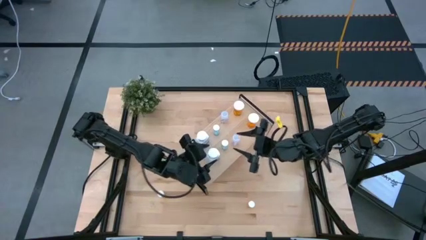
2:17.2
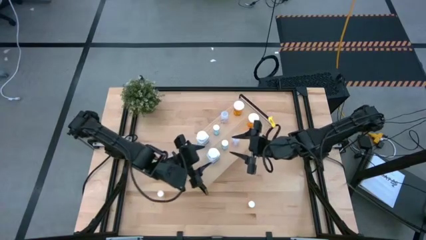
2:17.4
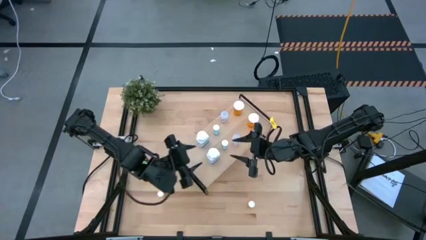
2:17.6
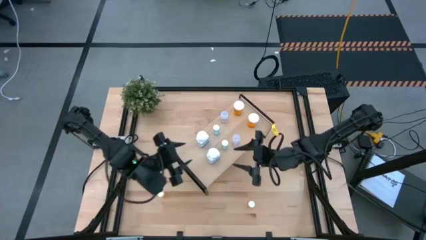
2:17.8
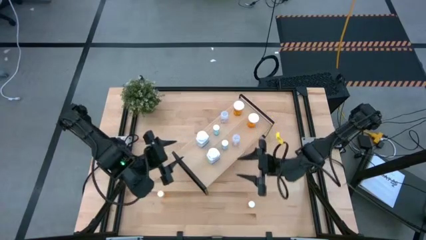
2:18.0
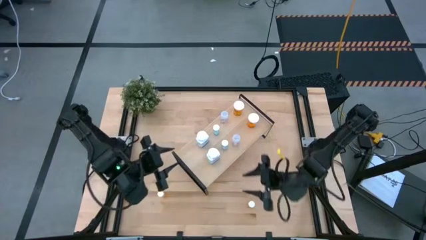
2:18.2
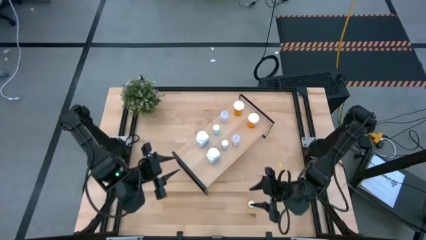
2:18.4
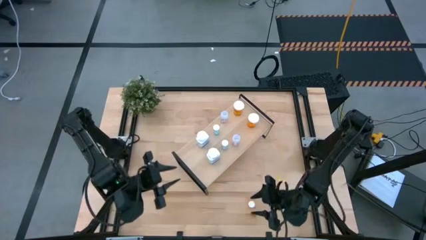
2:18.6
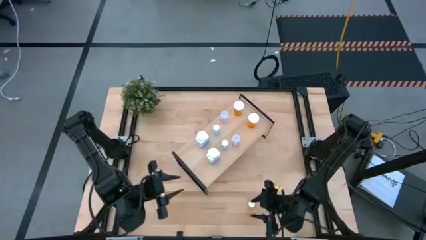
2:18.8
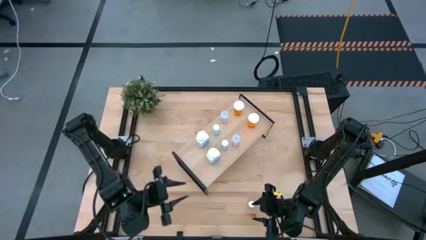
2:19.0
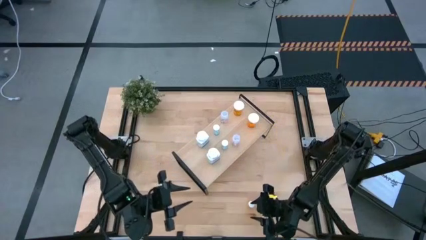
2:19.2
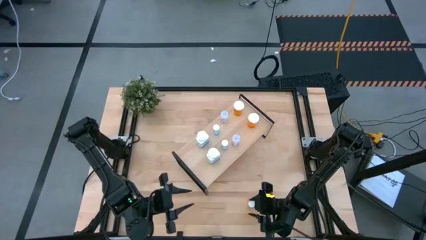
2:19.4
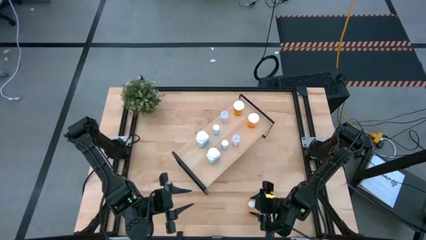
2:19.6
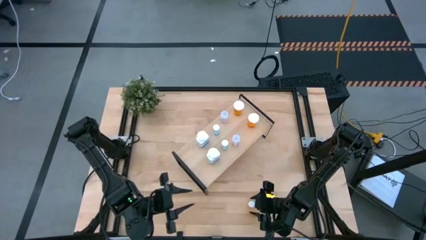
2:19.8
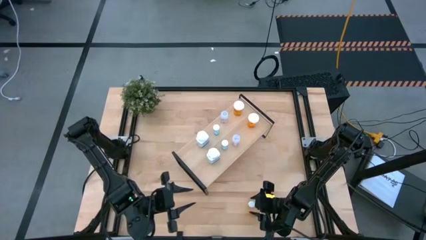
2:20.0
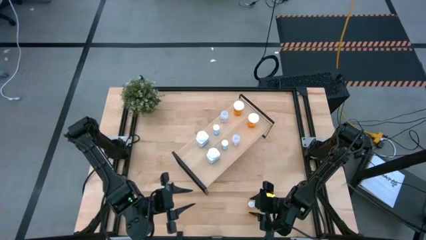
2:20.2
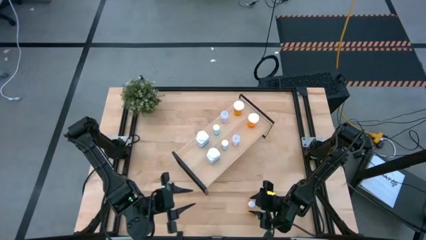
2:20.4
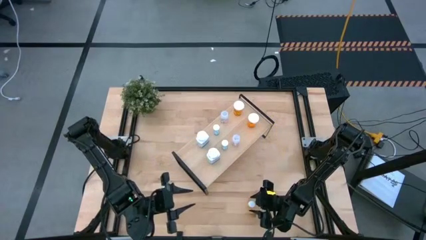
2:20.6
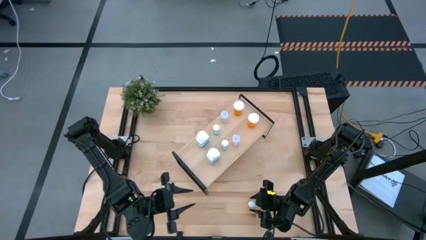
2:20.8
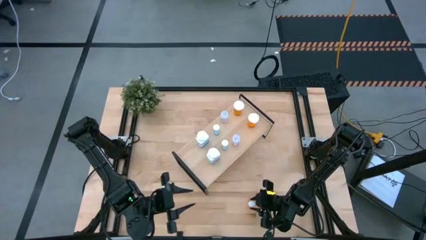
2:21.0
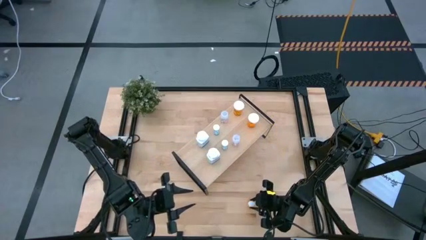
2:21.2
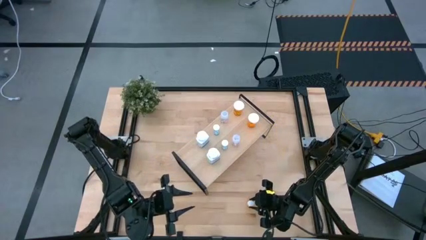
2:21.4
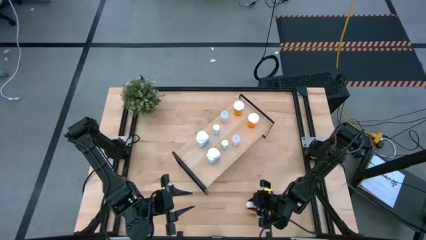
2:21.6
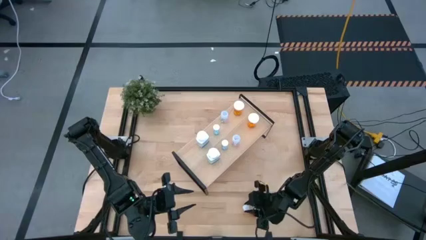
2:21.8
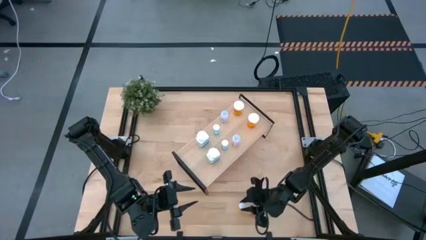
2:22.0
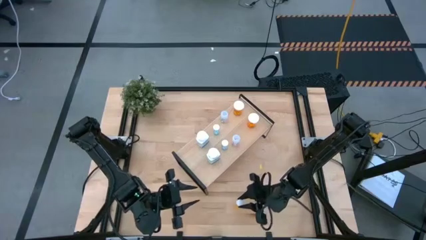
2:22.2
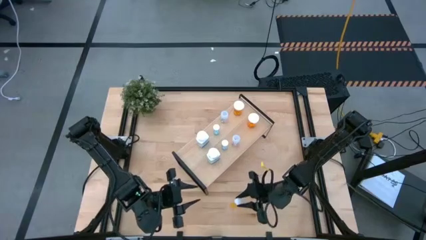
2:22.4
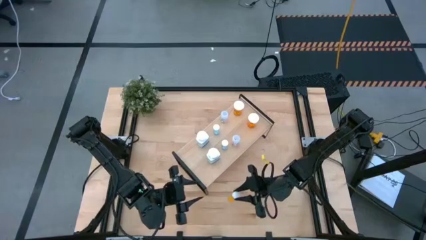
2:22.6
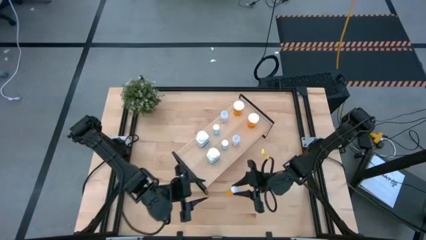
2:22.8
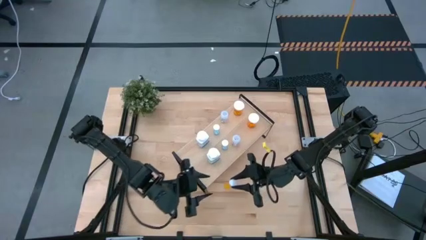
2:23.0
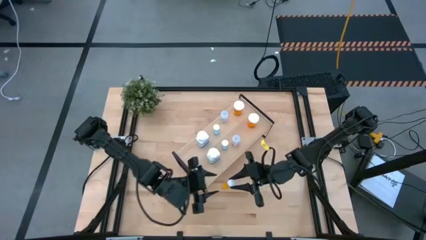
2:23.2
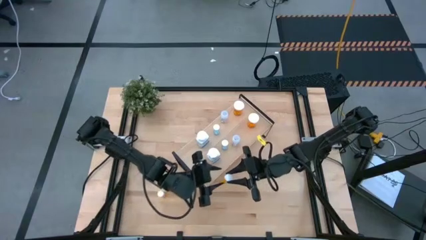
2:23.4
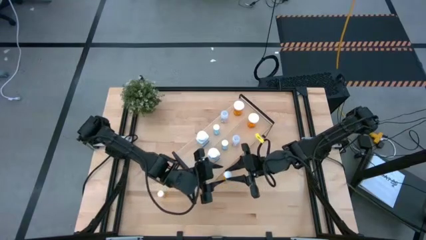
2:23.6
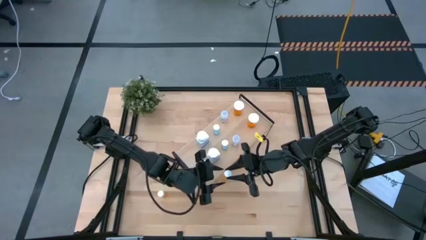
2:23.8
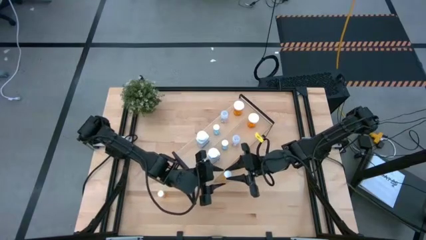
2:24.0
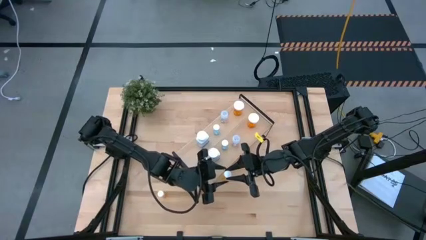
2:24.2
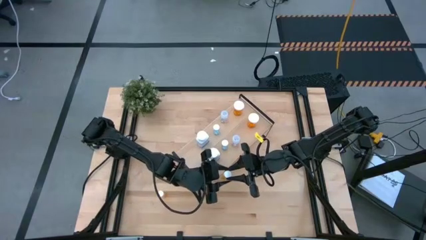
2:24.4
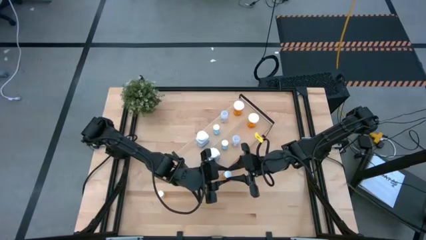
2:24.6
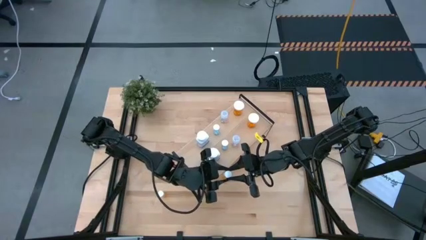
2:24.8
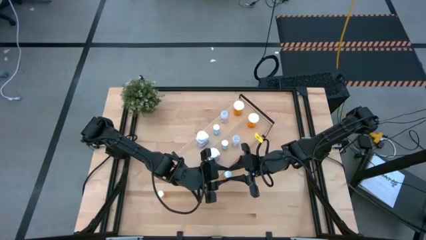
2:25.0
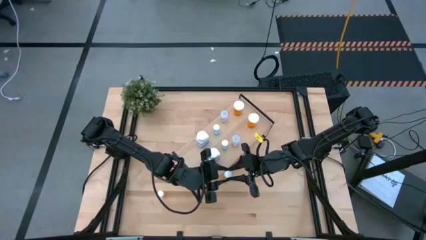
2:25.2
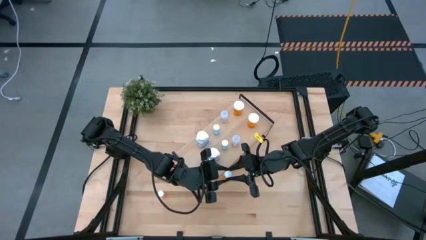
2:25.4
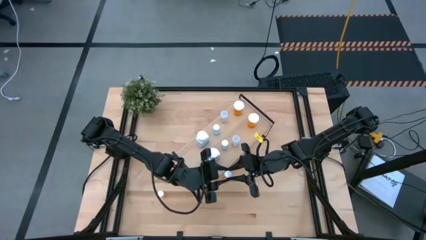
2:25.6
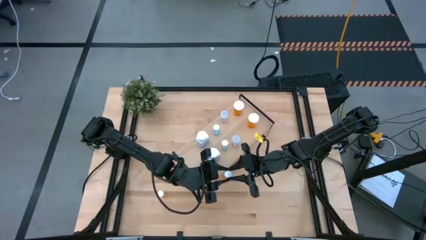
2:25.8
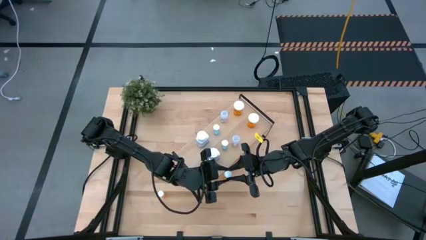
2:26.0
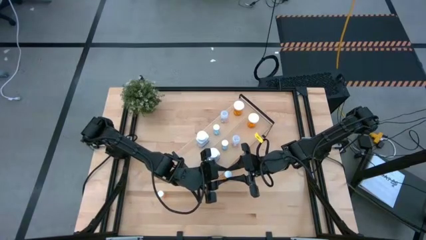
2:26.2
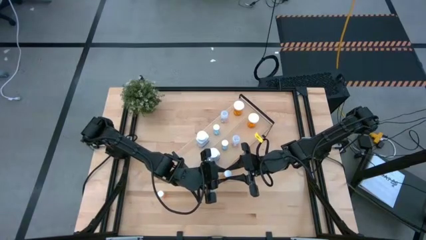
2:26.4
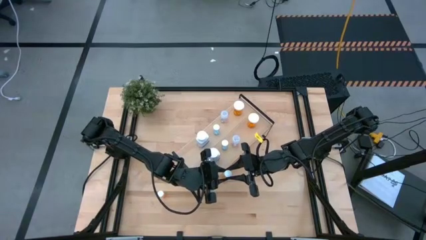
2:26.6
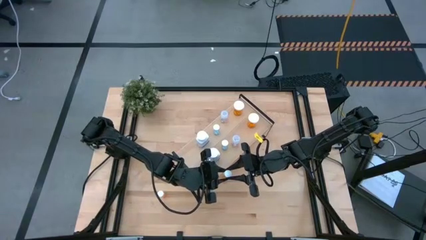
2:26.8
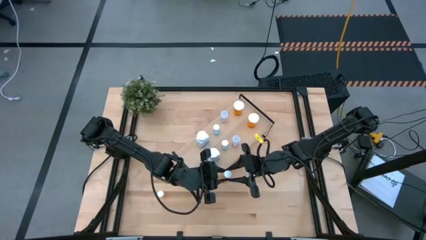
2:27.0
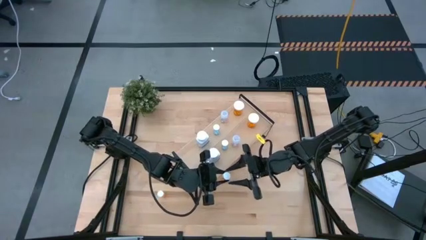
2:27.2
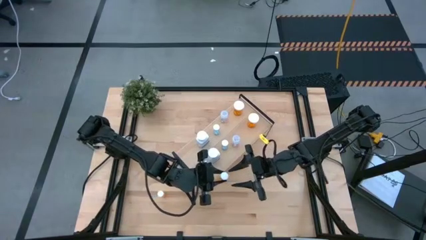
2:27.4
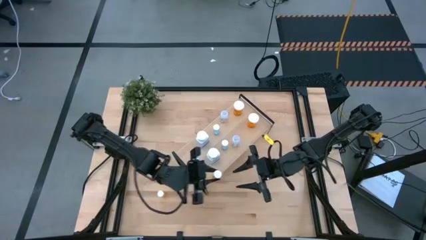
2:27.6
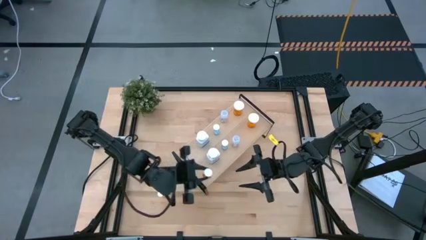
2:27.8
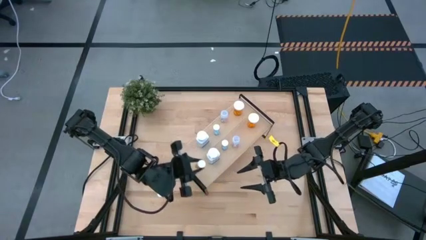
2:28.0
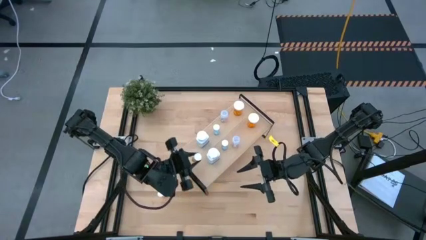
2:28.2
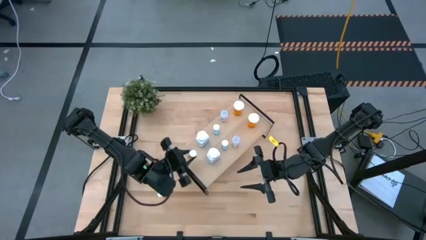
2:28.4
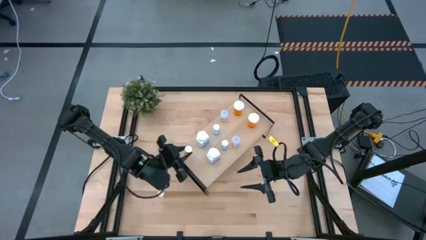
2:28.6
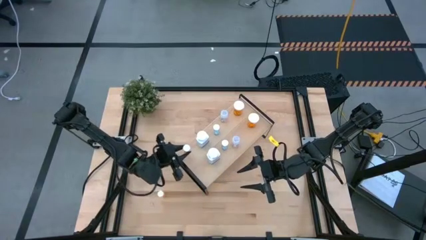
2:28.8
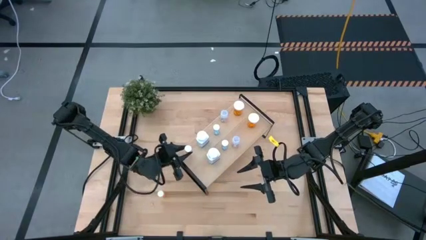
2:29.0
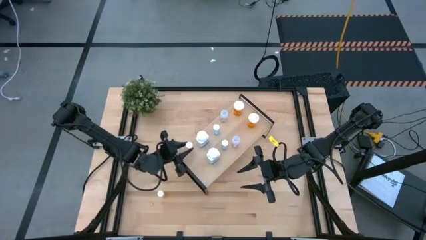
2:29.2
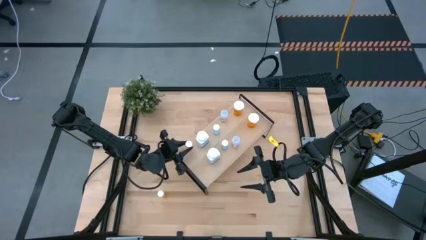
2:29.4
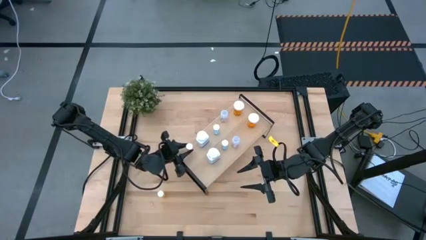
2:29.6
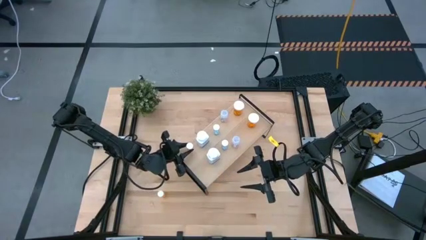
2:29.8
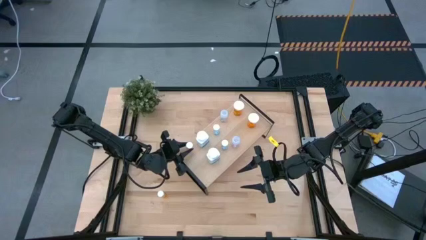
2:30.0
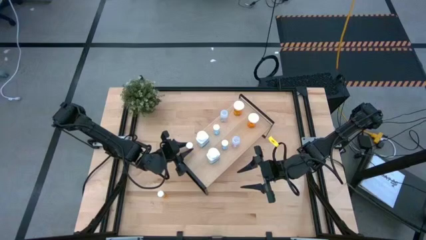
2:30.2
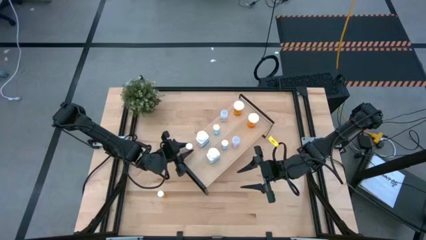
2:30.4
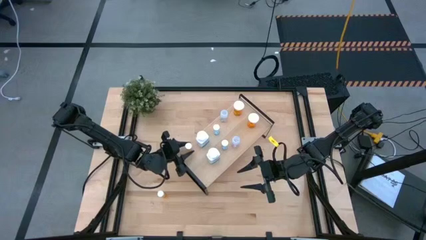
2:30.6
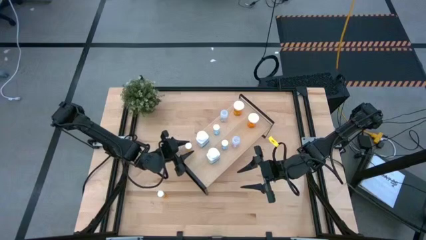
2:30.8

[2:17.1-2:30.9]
Task: Pick and place medicine bottles onto shelf by color
Put the right small orange pill bottle on the shelf
